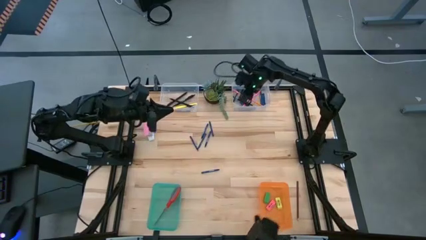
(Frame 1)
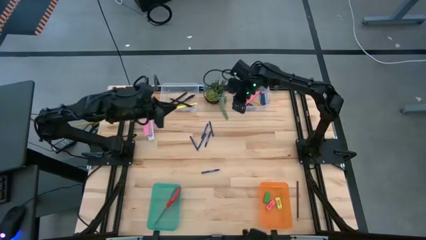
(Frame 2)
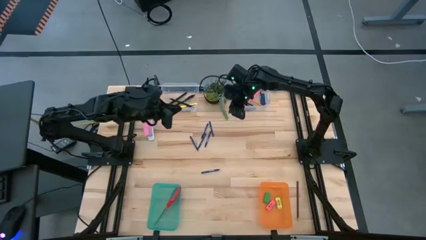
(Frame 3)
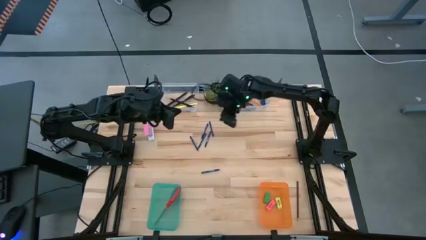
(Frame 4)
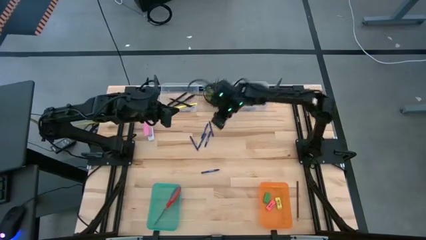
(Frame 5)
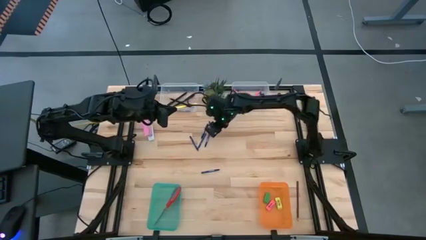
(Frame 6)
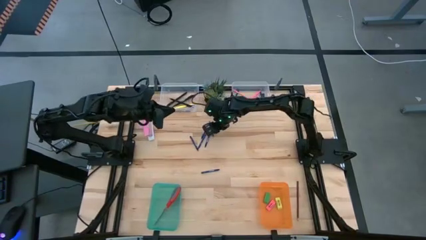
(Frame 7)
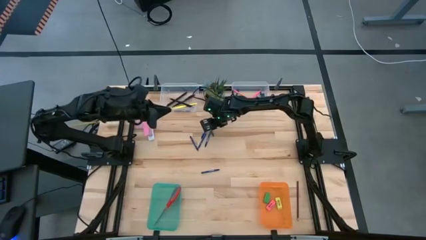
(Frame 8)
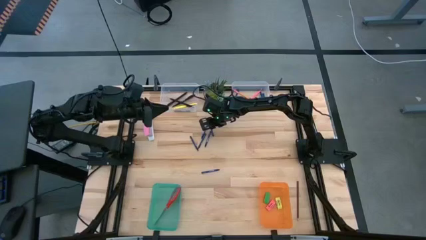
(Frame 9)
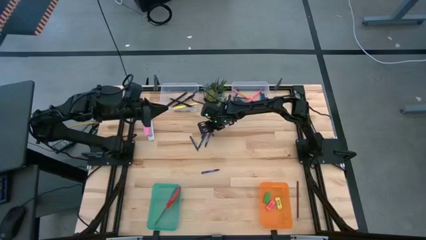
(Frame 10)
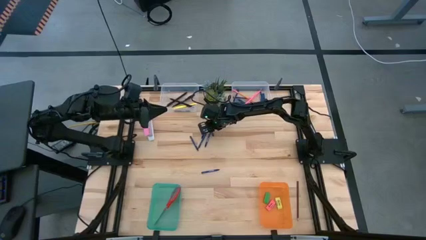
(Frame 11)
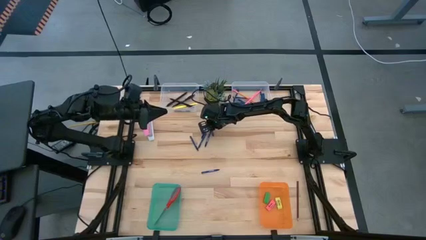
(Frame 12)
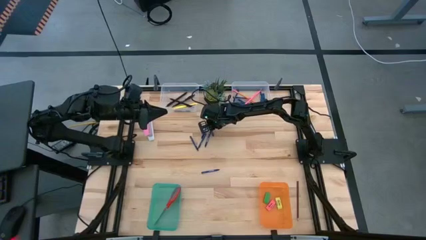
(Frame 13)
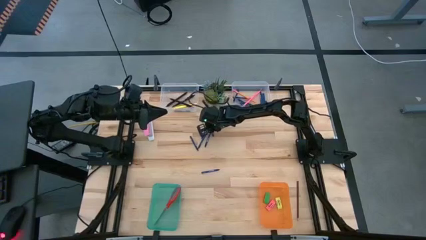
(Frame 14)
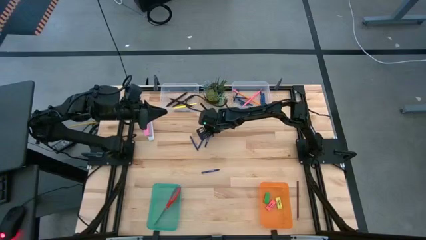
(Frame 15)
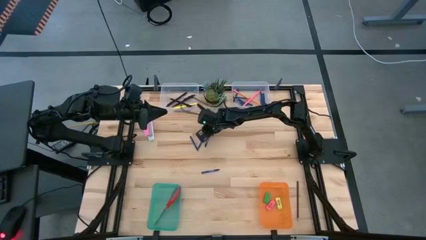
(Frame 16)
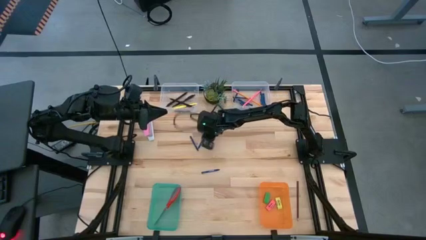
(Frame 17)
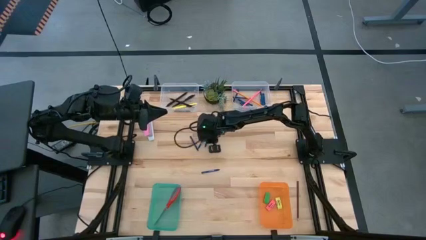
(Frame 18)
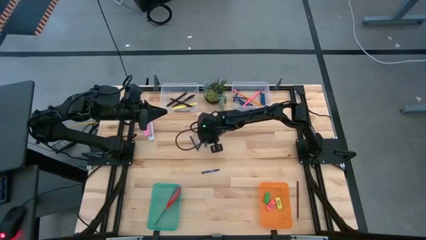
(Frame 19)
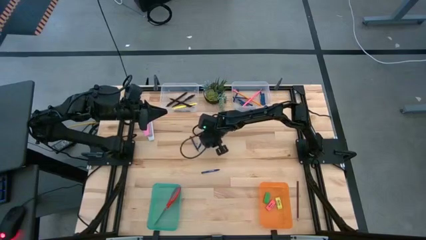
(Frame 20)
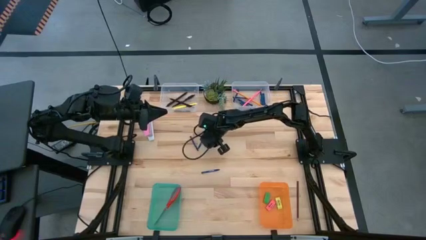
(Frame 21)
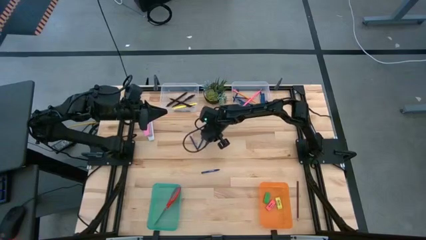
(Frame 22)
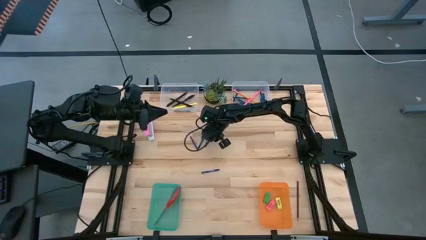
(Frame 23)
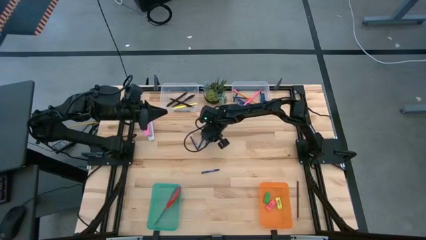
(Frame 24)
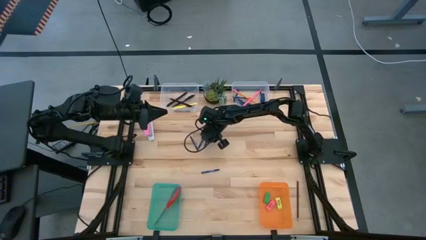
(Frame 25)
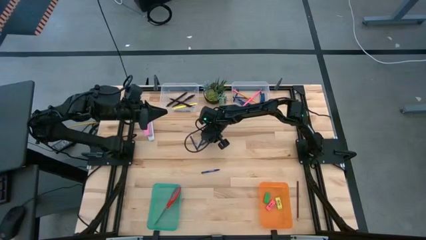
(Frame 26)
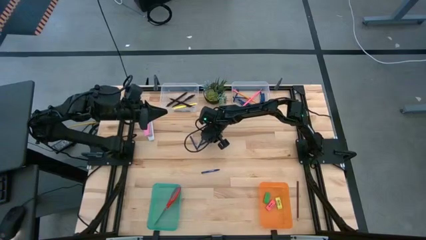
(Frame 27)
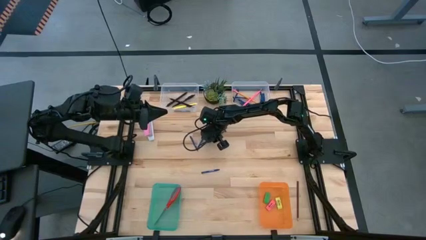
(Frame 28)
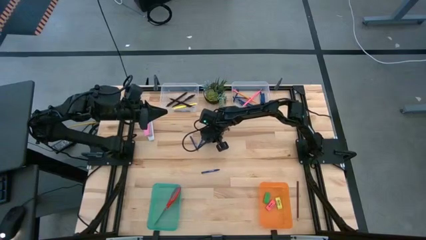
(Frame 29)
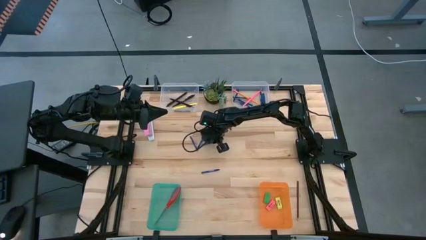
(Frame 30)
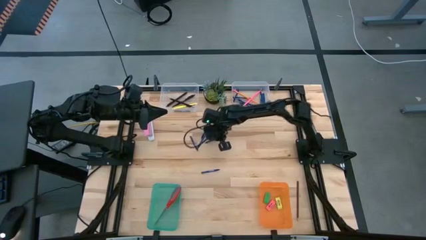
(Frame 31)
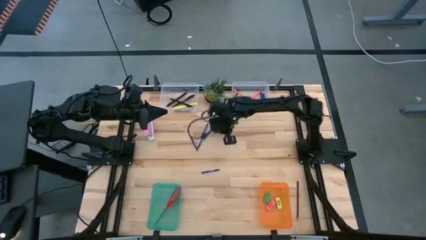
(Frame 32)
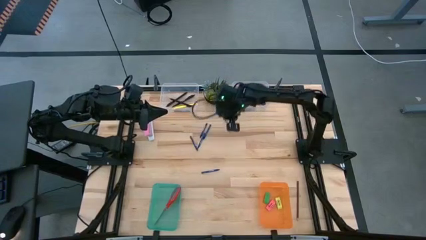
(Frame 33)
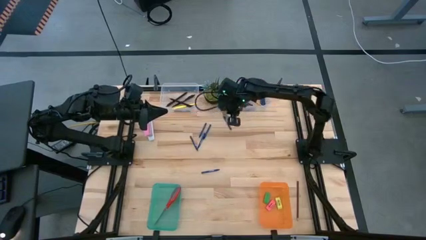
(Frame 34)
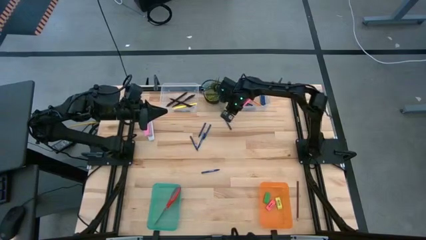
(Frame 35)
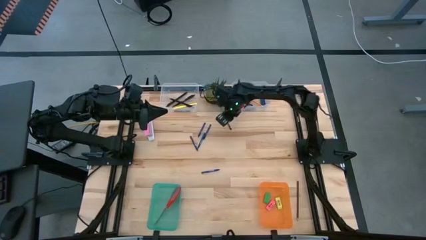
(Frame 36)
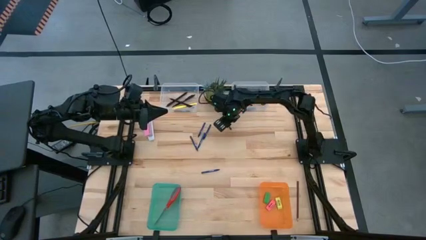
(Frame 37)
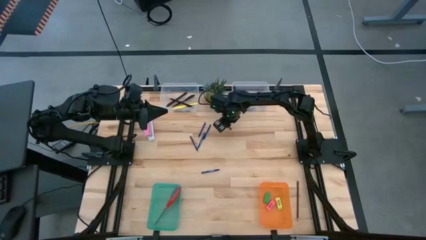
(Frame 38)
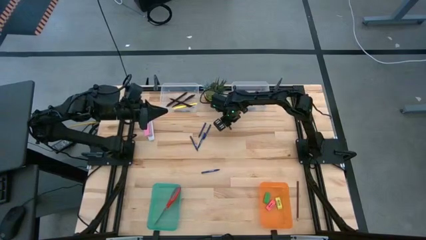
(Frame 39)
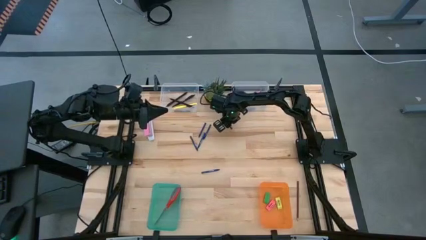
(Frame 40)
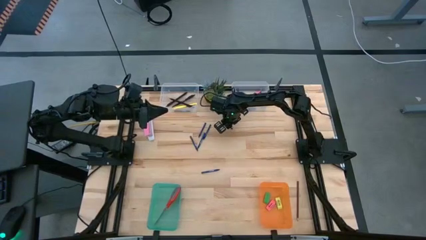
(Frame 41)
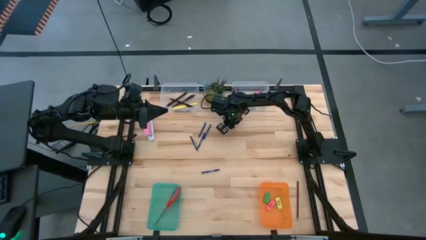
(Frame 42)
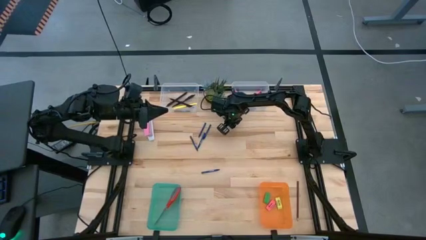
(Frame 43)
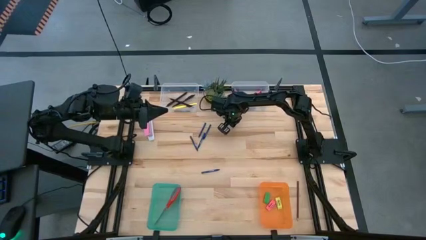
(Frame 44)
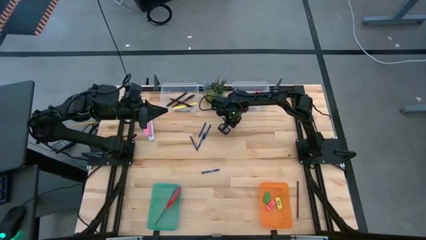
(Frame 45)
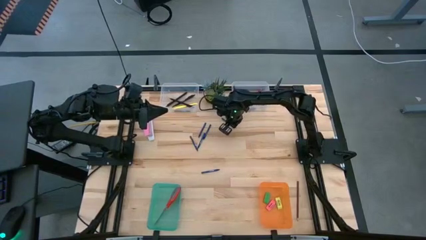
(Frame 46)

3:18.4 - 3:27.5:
Task: Sort crayons/erasers/pens/pencils in bins
Put the blue crayon into the right transparent bin

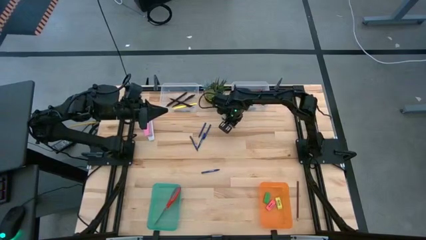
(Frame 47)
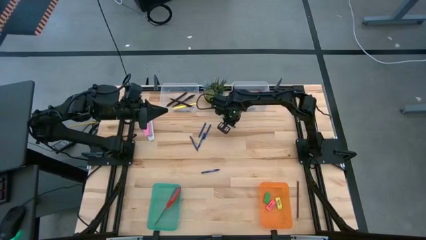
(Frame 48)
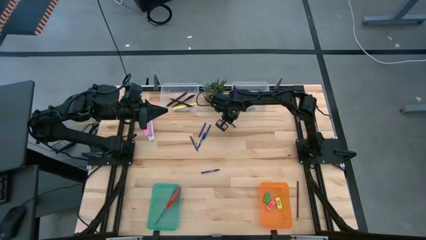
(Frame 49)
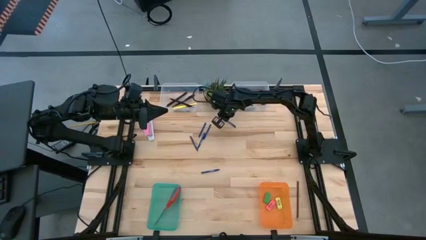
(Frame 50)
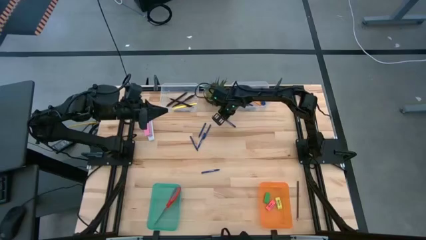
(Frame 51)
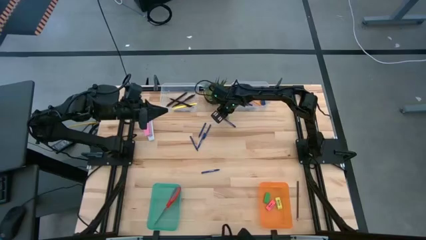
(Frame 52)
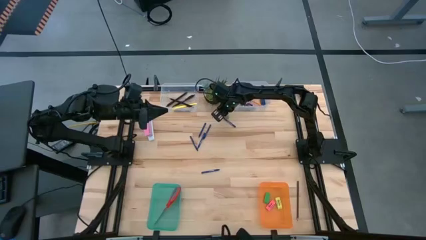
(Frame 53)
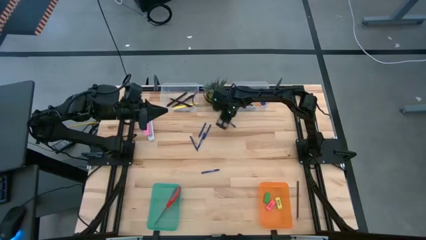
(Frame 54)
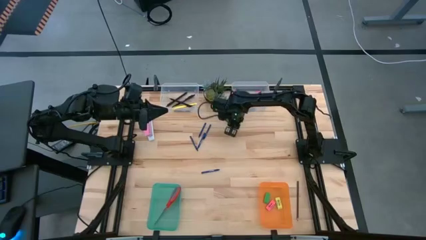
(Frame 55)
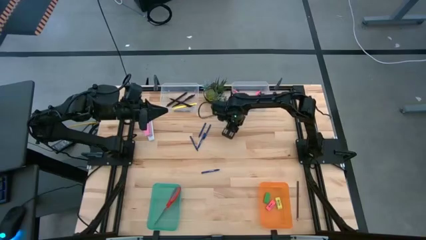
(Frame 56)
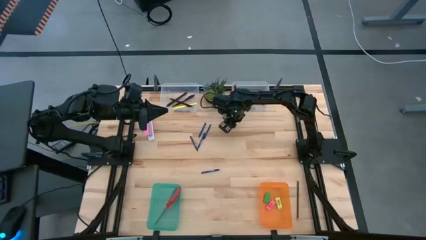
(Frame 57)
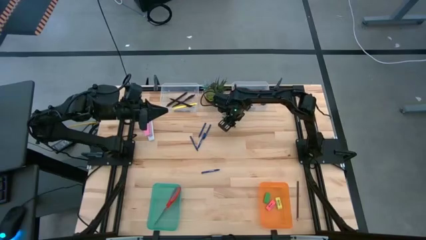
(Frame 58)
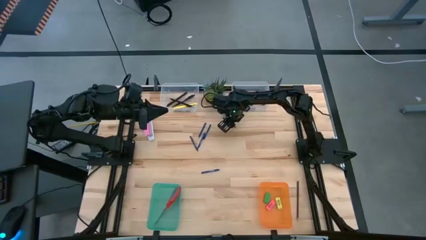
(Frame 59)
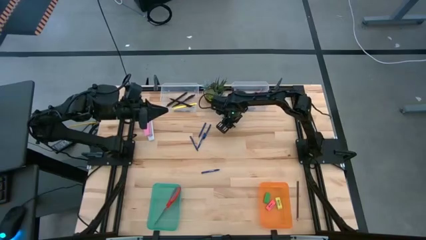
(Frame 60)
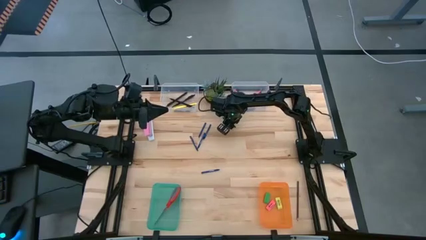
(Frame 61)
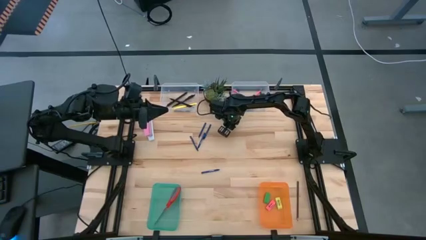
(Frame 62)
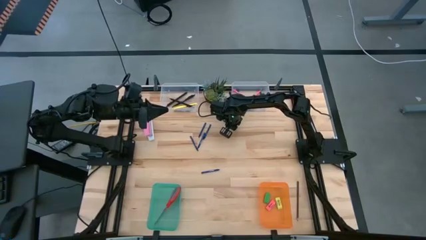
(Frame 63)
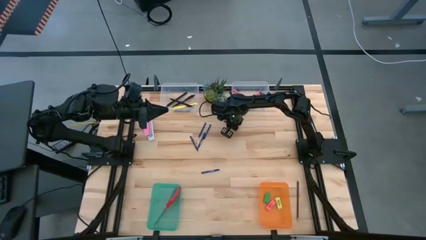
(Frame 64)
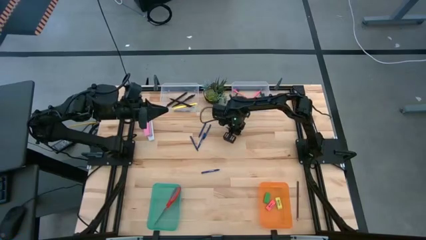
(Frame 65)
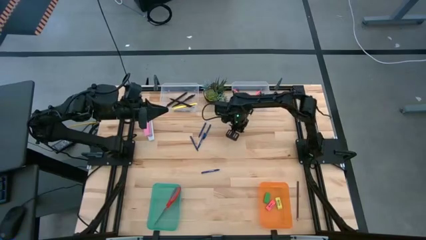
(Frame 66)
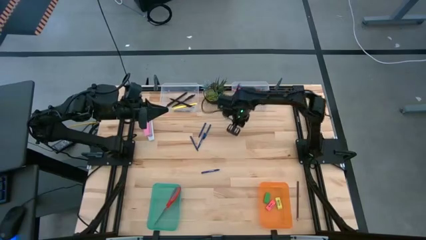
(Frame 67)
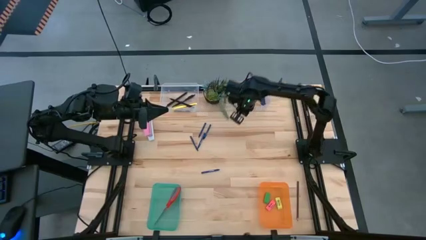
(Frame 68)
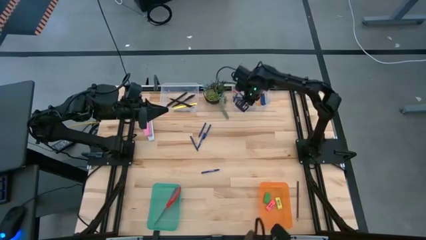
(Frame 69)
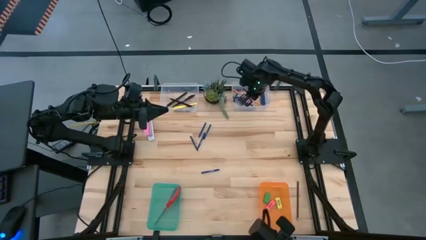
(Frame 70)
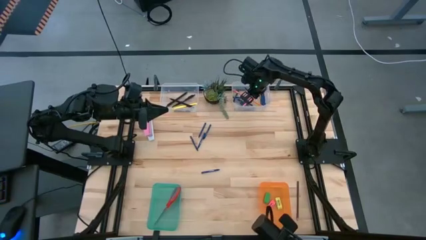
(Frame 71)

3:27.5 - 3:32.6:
Put the blue crayon into the right transparent bin

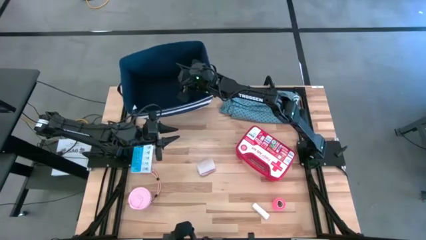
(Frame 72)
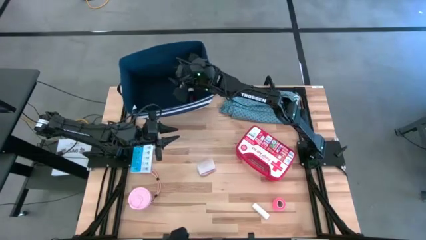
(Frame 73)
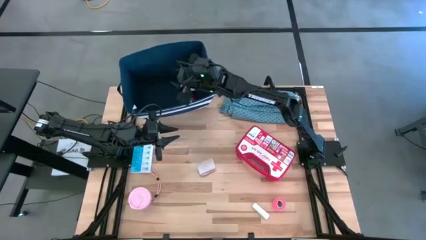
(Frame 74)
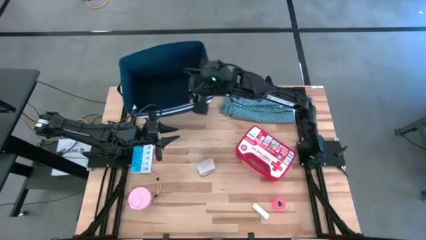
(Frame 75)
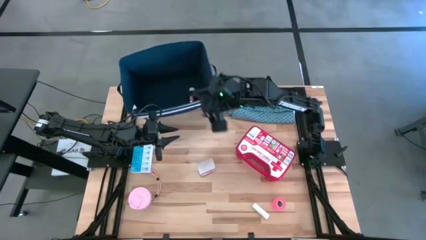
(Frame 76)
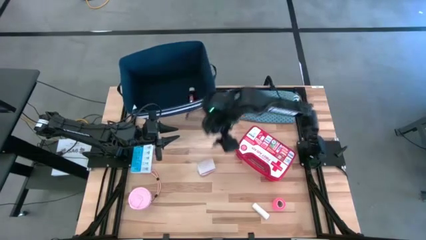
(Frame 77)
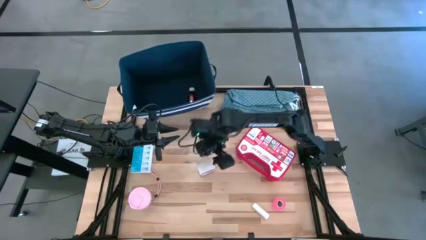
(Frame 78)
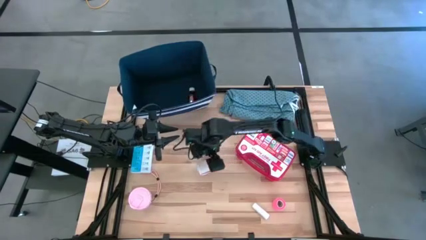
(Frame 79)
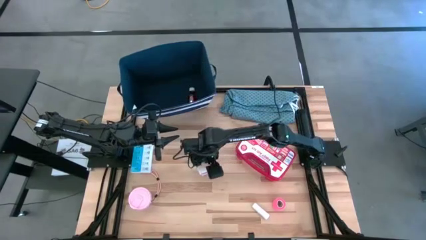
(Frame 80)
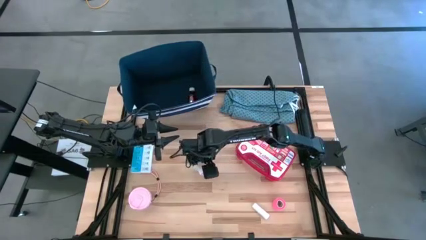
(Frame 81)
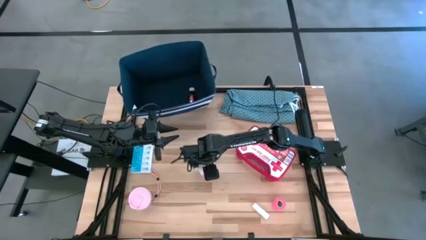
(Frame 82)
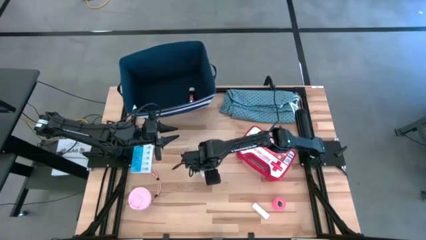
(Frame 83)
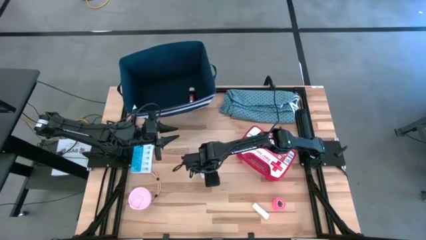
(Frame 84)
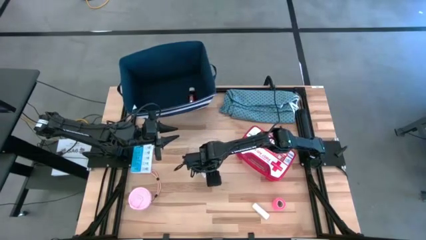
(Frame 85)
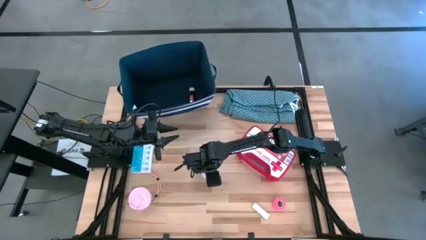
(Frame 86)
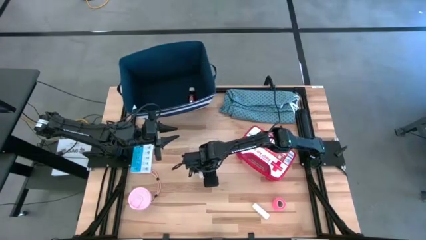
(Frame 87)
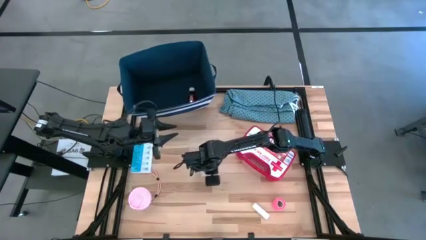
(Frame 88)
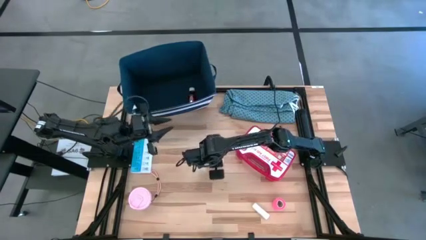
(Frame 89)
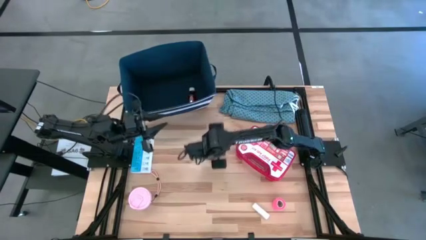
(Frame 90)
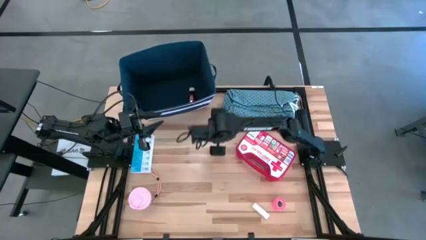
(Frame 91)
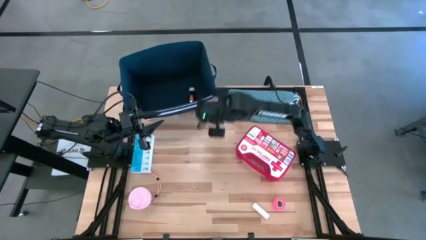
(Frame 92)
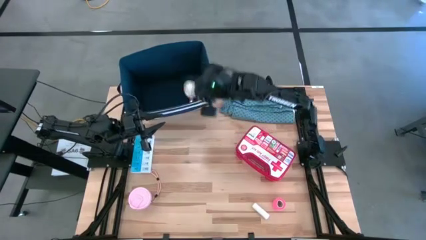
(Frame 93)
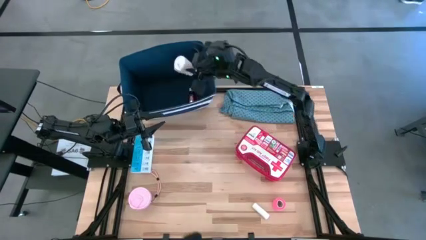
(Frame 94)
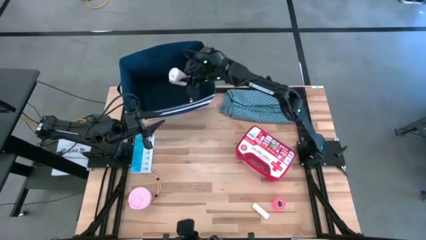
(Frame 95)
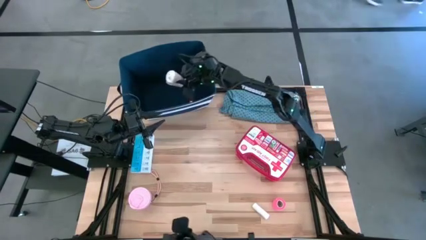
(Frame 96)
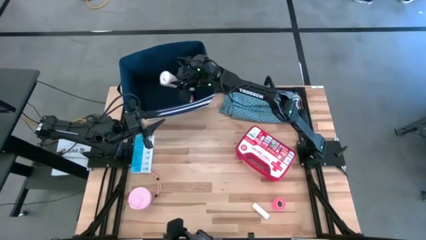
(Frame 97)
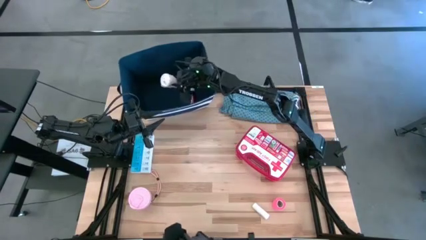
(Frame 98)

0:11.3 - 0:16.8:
Task: Pick & place medical supplies in basket/bin
Put the white bandage into the blue bin
